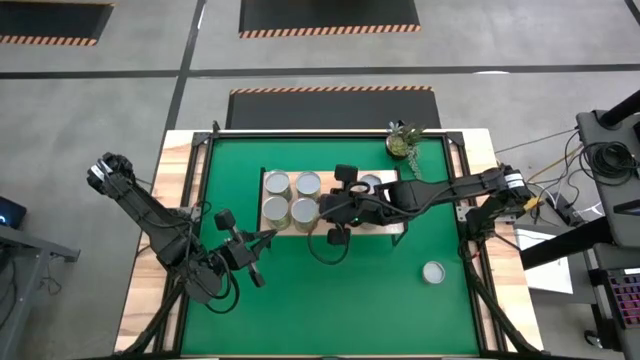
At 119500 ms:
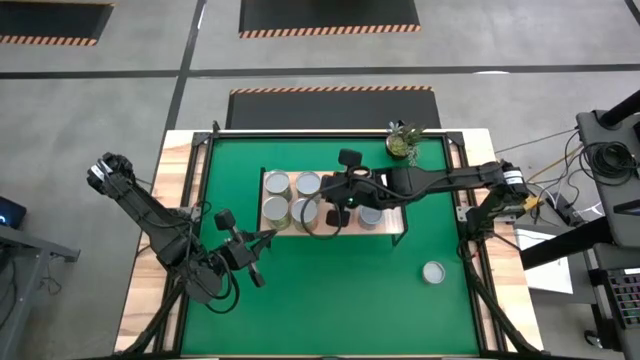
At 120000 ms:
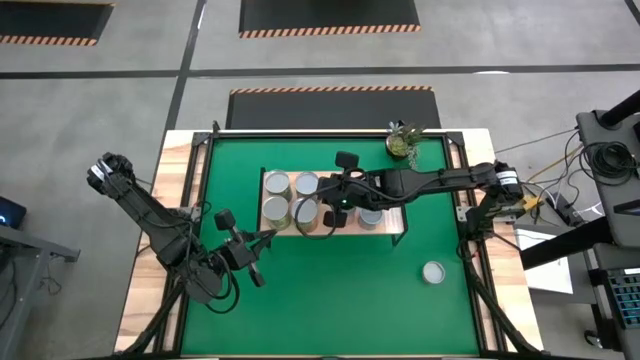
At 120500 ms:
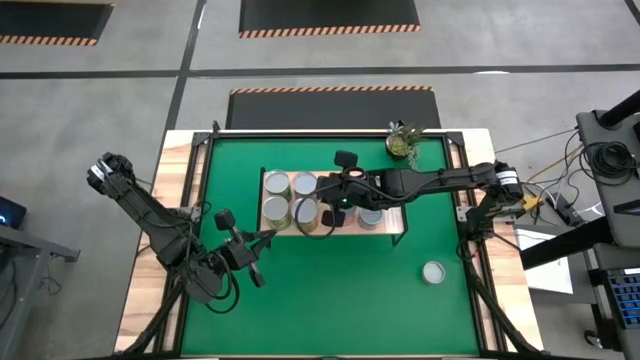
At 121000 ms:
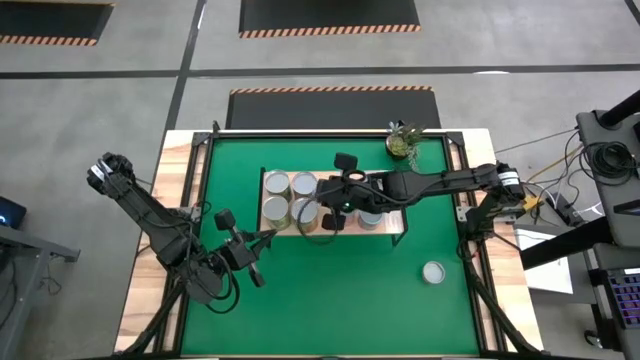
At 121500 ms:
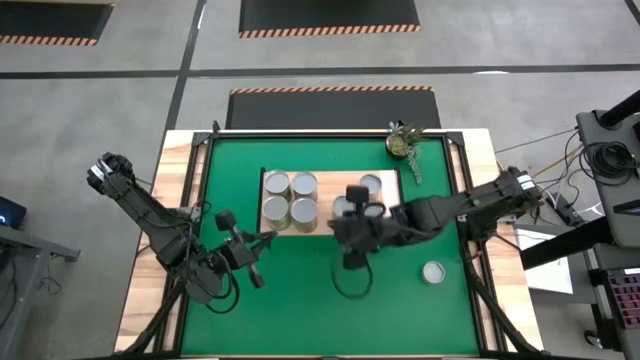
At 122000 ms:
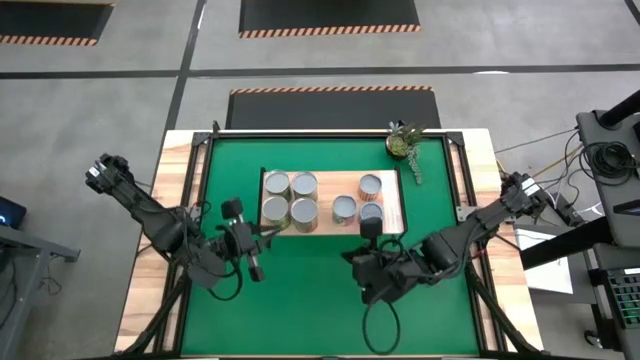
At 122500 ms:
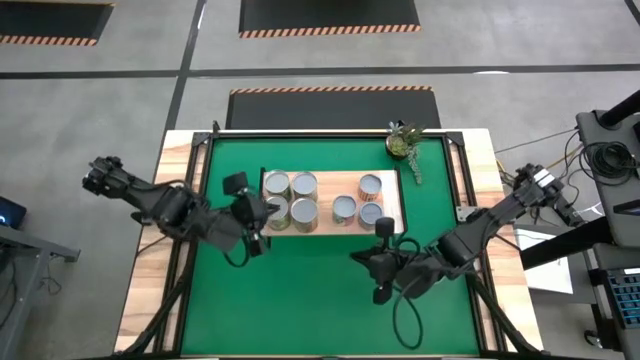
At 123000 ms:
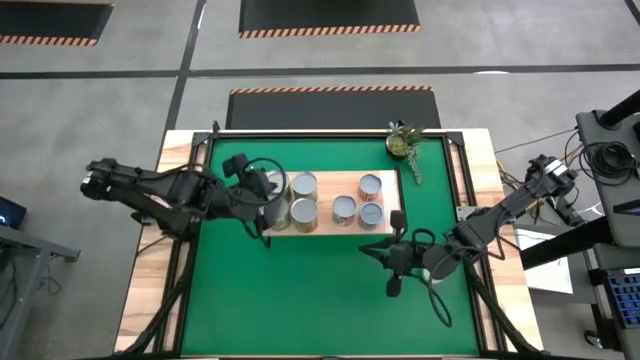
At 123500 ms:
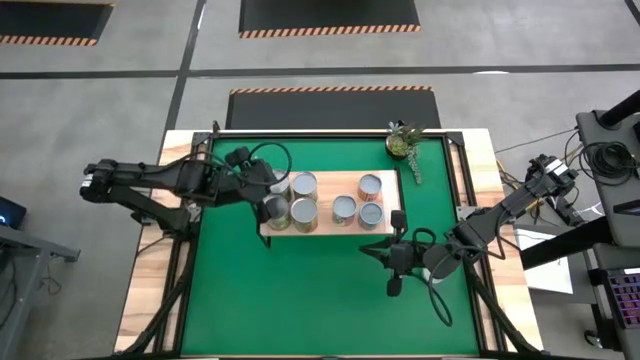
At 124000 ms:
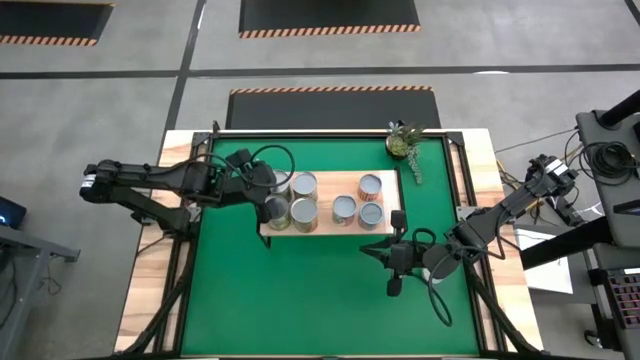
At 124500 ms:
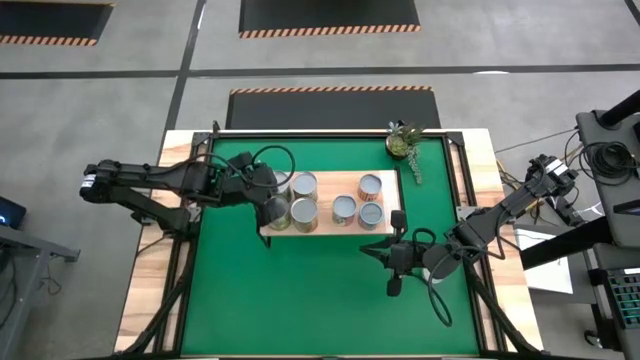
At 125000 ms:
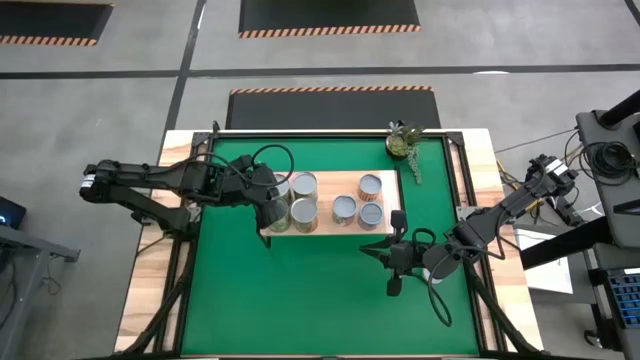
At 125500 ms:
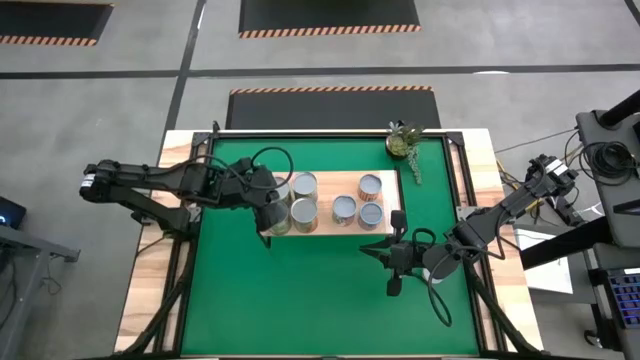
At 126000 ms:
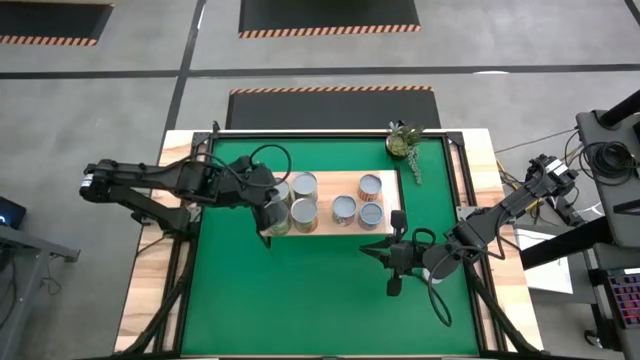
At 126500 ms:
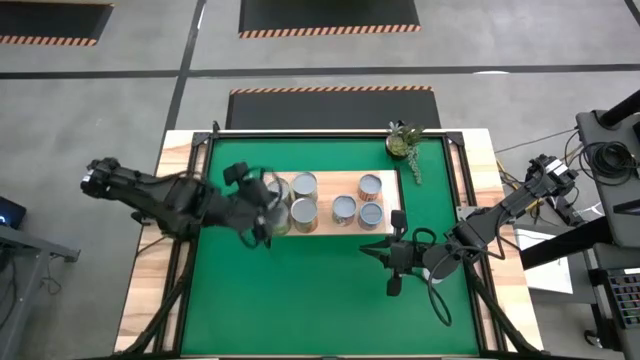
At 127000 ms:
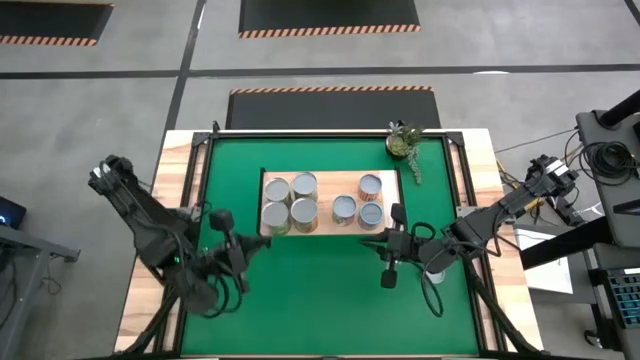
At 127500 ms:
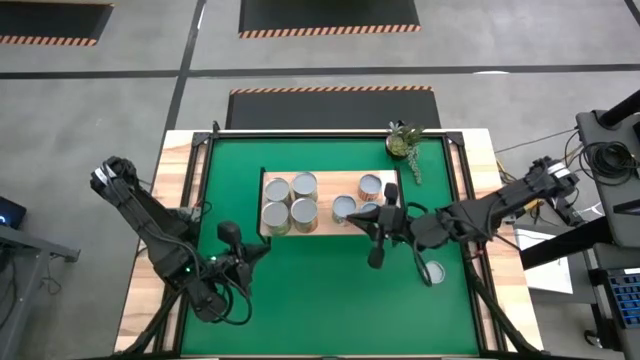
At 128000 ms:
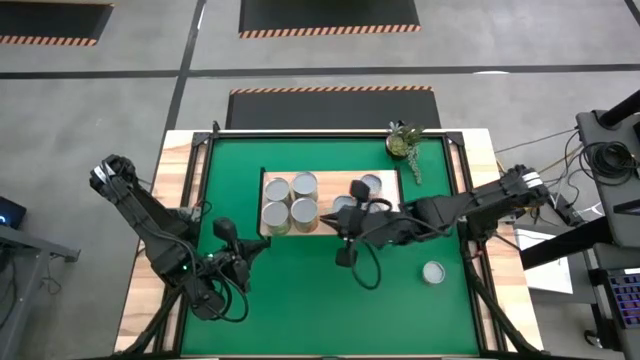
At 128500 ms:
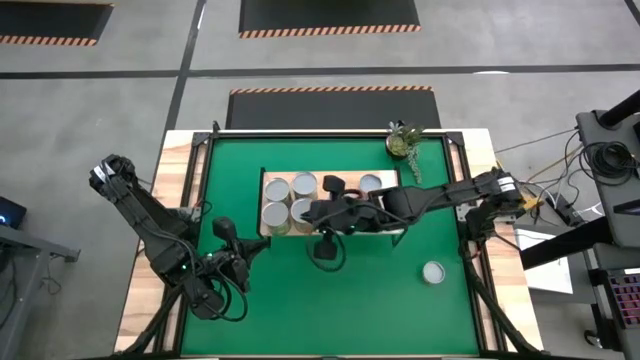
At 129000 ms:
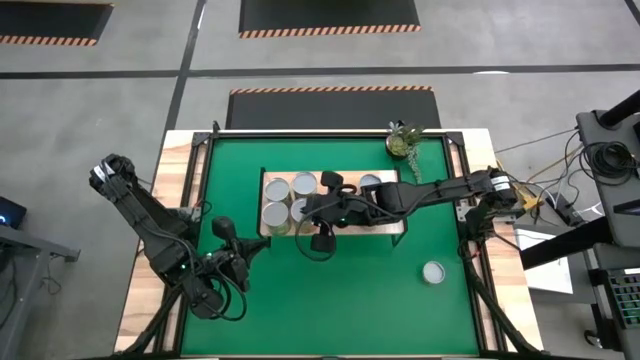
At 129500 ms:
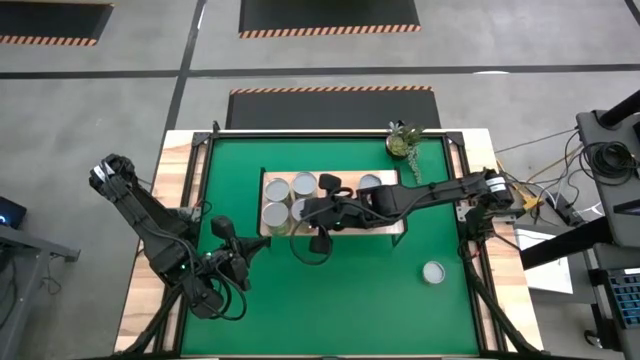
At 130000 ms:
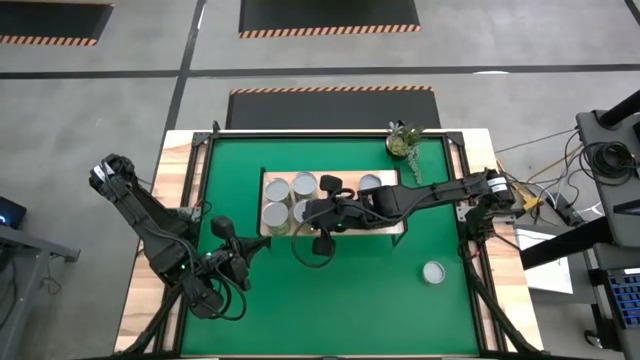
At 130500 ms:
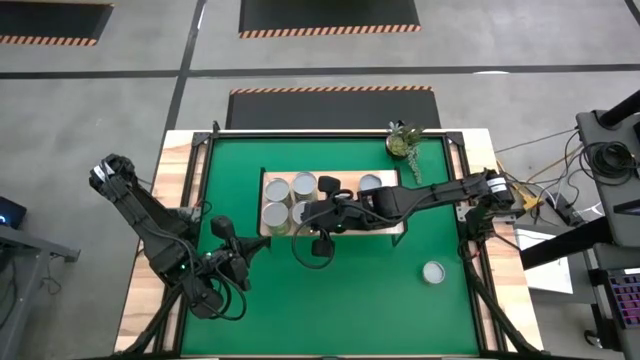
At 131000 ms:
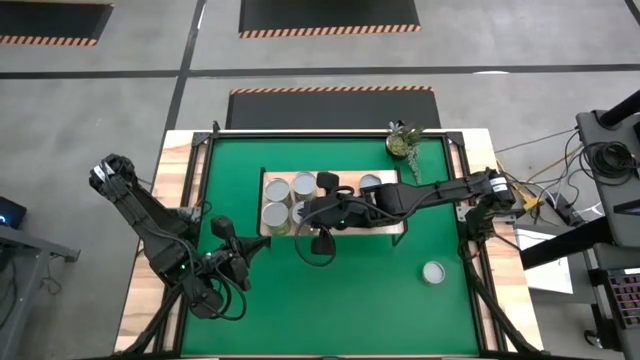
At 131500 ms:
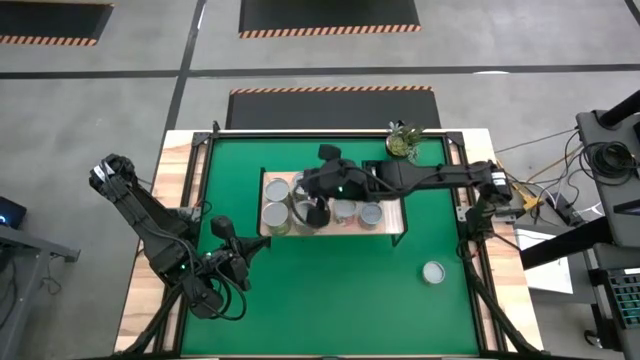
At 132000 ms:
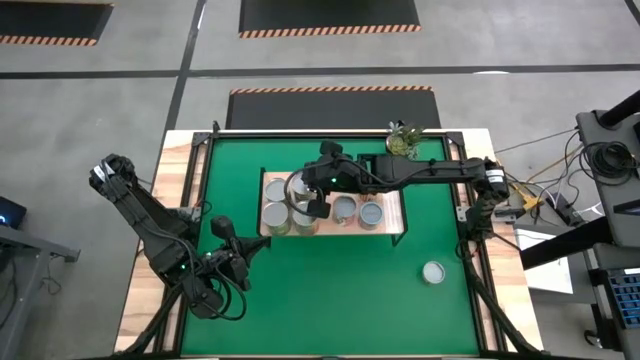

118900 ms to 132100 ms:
Task: Pick and place cans onto a shelf
Adjust the cans on the shelf

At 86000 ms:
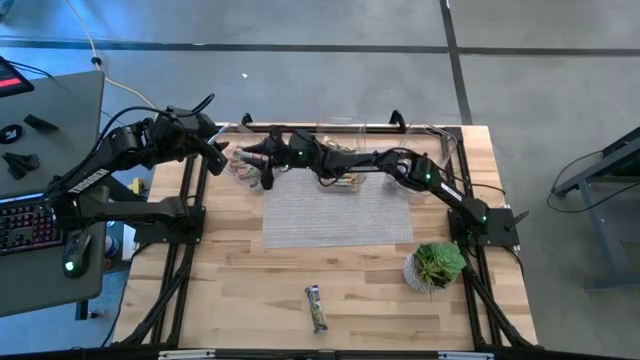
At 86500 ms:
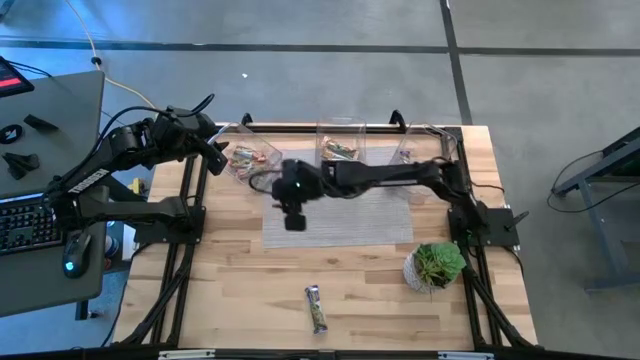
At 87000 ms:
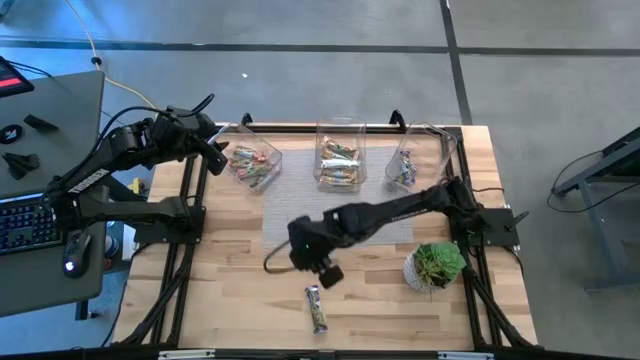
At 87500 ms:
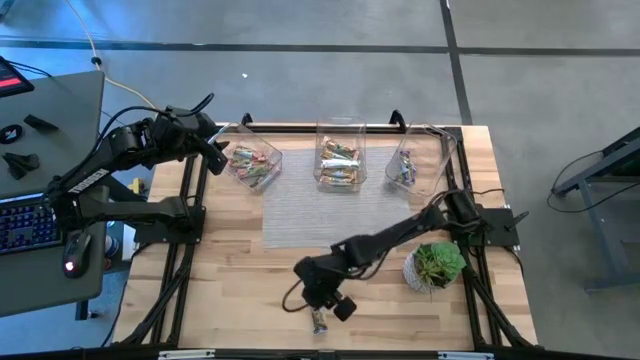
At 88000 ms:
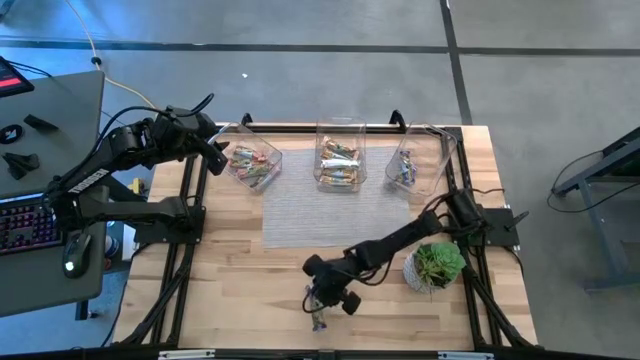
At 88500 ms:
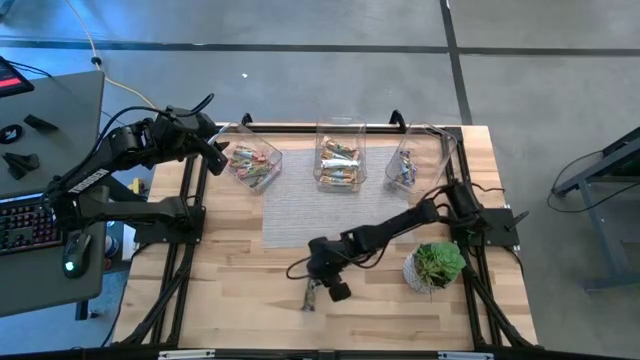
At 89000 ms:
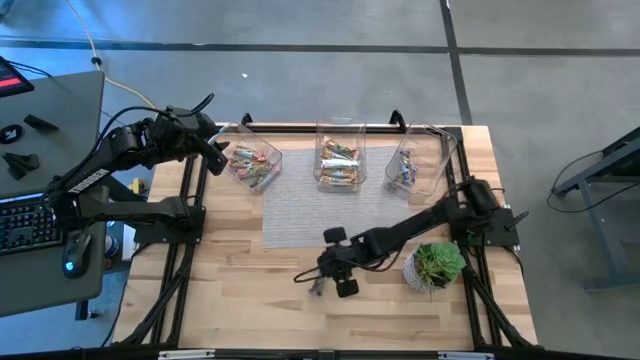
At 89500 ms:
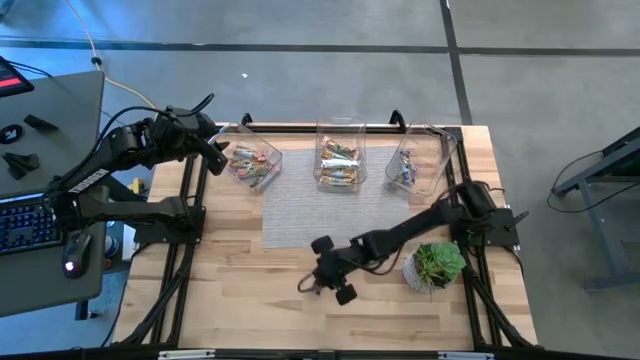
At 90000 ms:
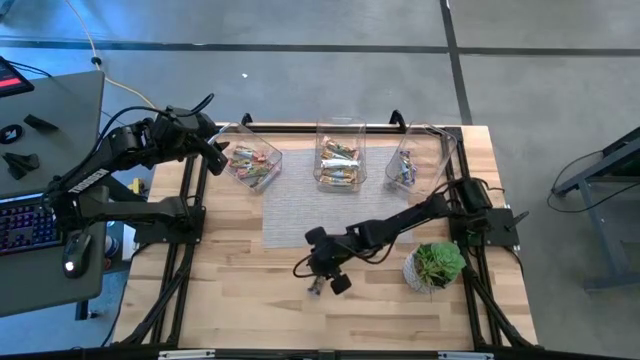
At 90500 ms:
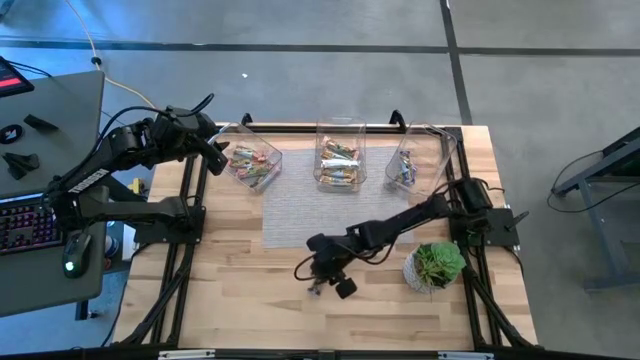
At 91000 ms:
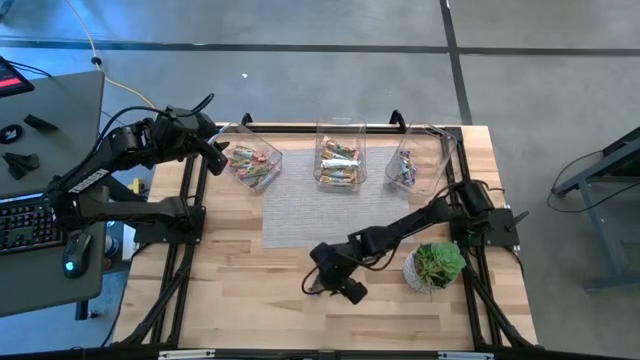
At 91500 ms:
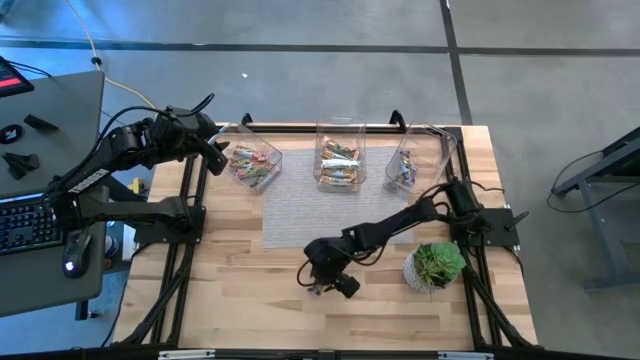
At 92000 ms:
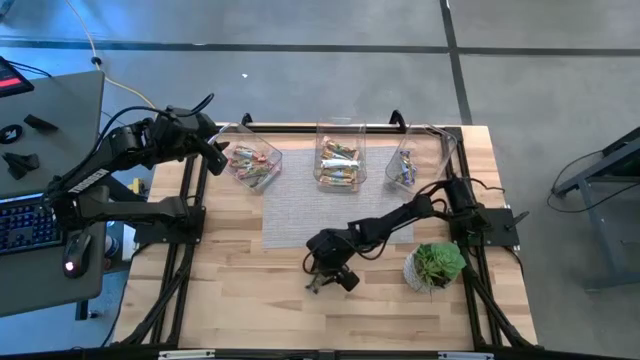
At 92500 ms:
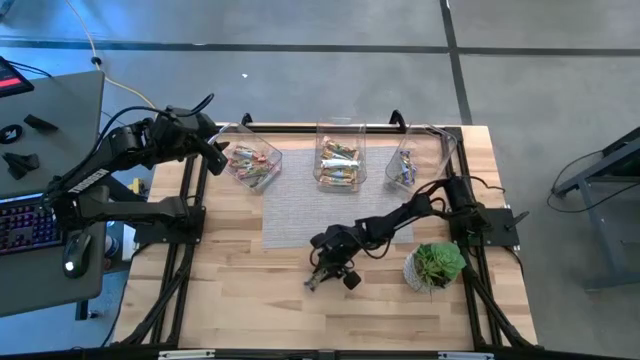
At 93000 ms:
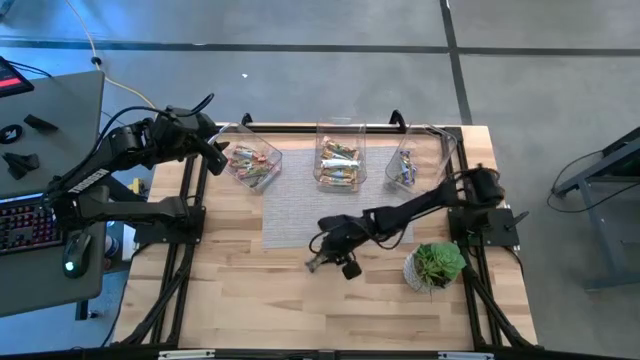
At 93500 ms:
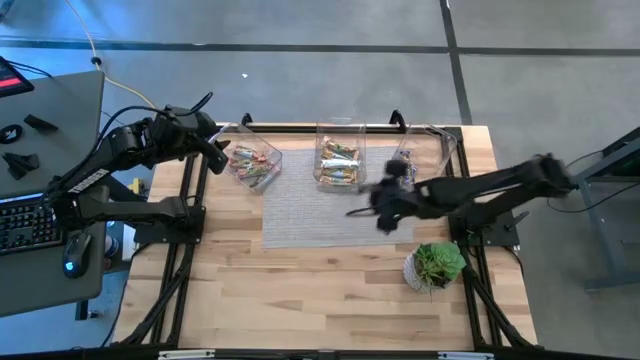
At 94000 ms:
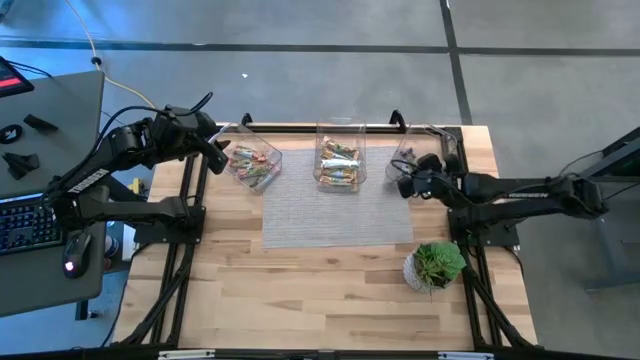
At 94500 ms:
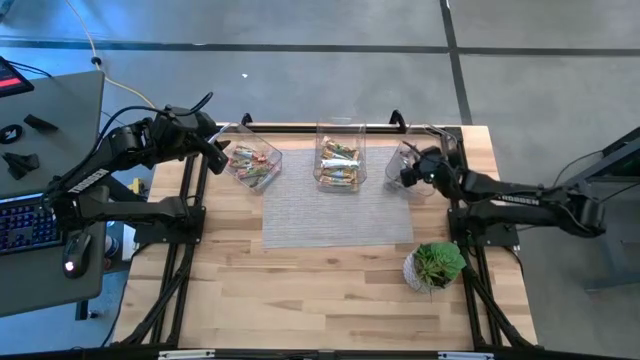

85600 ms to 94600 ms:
Task: Pick and place Granola Bars by type
Put the blue granola bar into the right transparent bin
